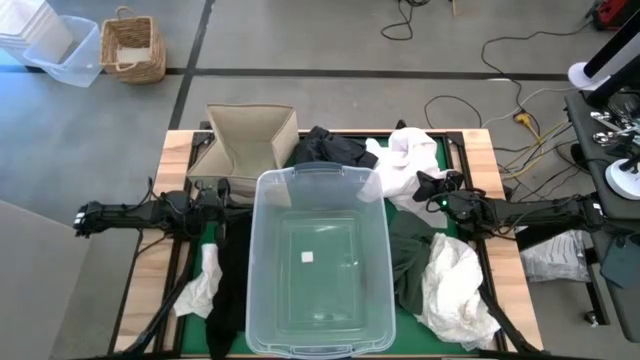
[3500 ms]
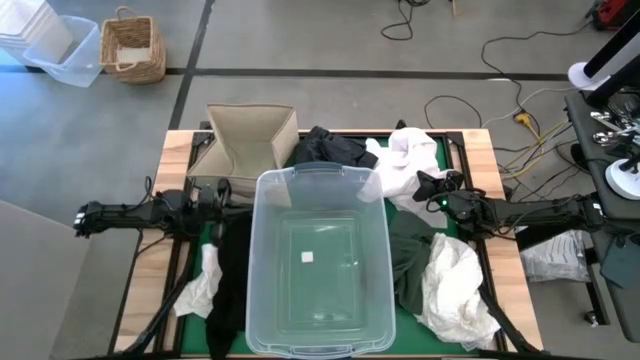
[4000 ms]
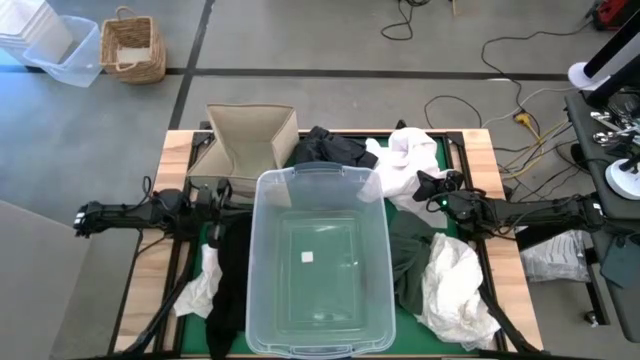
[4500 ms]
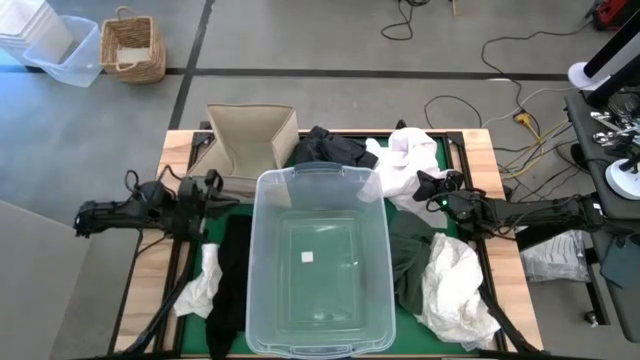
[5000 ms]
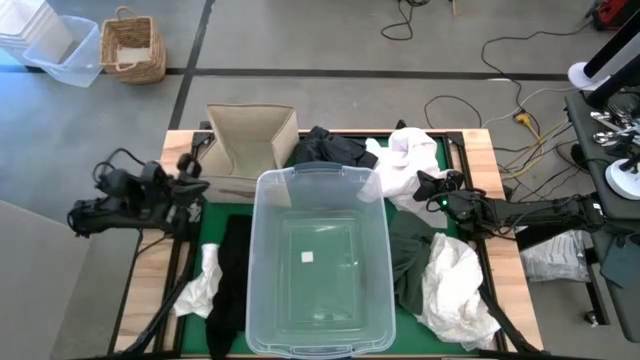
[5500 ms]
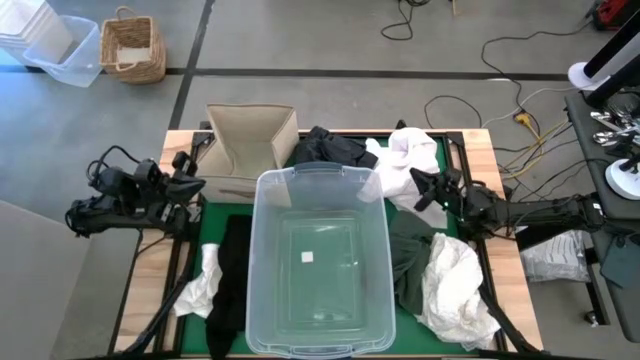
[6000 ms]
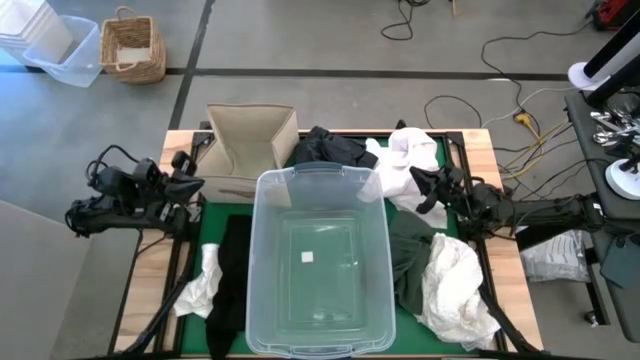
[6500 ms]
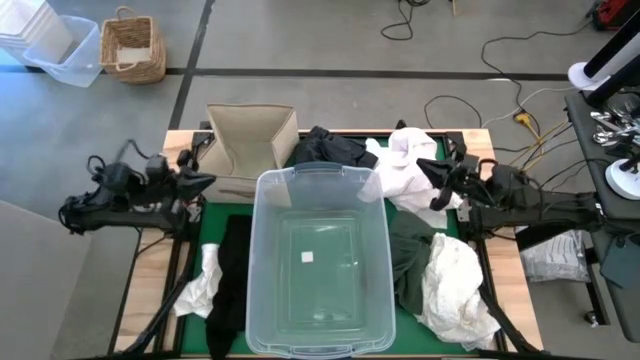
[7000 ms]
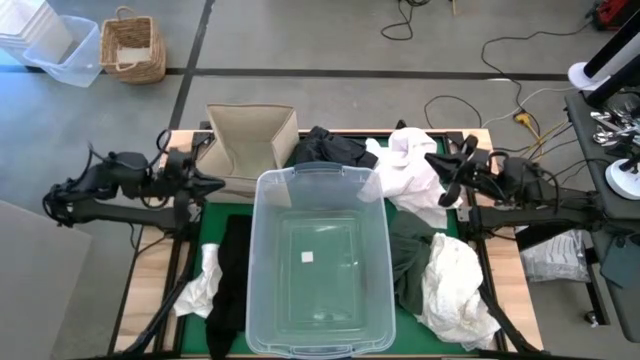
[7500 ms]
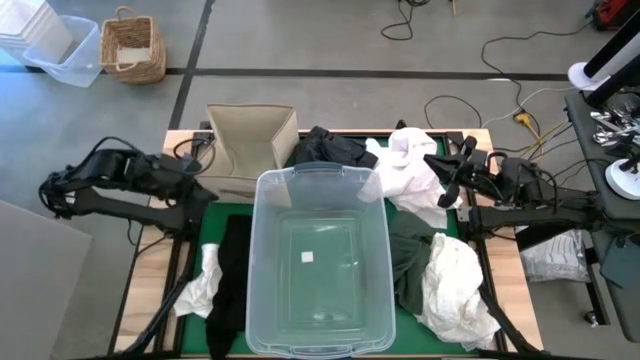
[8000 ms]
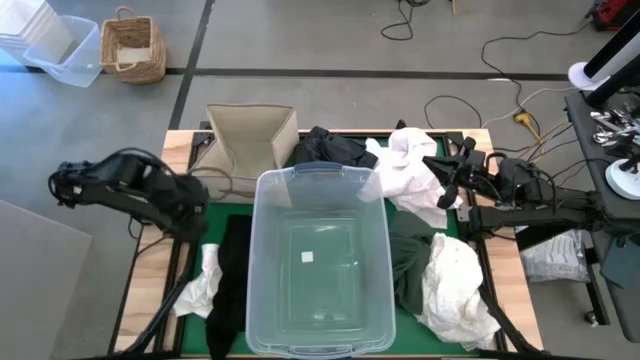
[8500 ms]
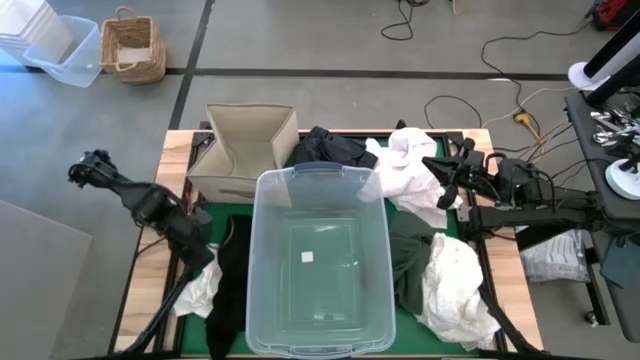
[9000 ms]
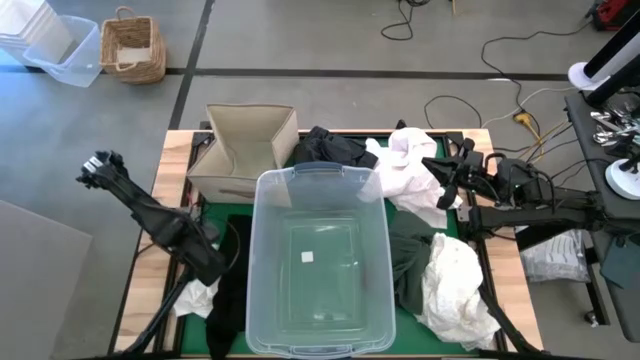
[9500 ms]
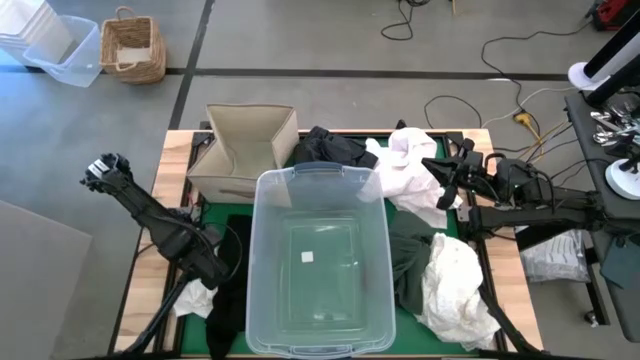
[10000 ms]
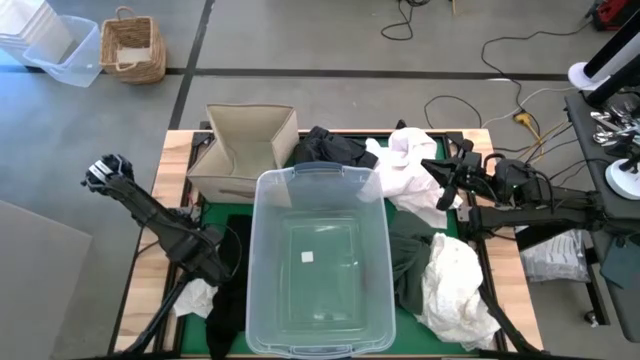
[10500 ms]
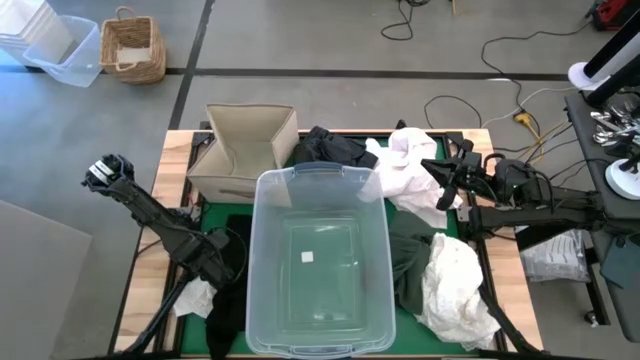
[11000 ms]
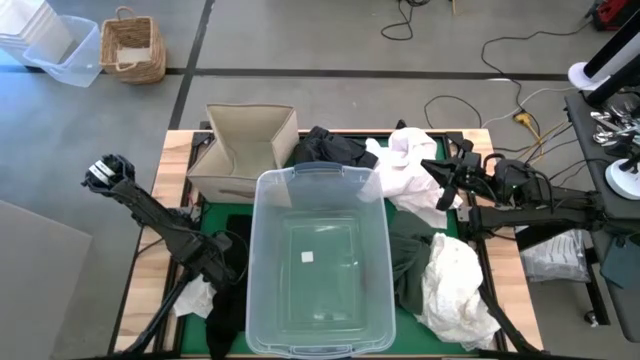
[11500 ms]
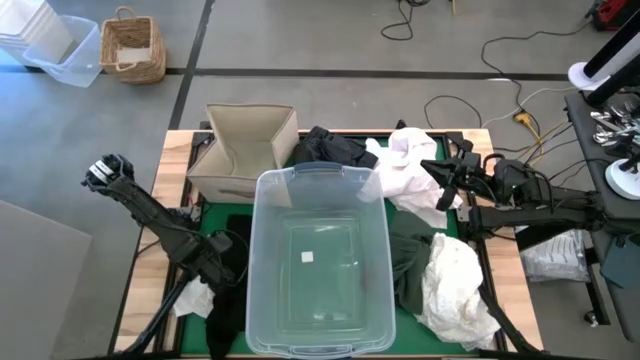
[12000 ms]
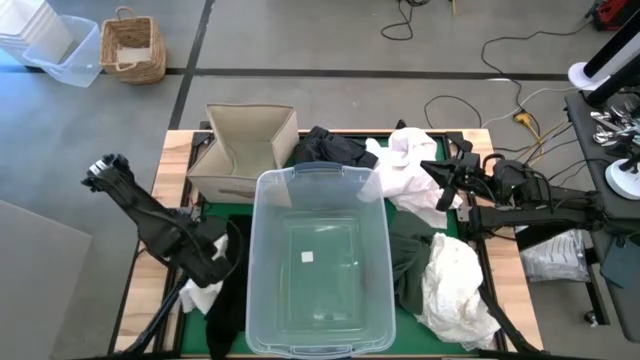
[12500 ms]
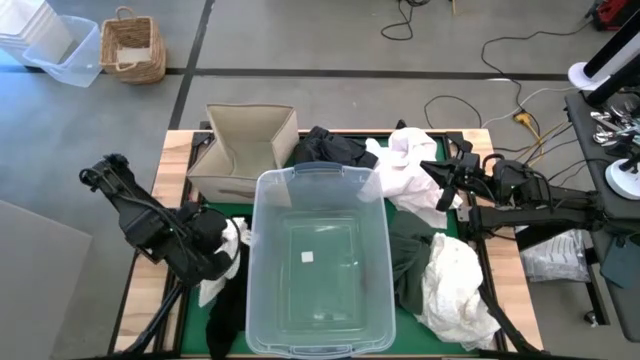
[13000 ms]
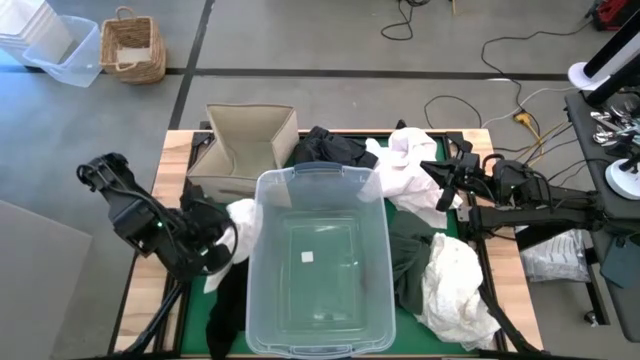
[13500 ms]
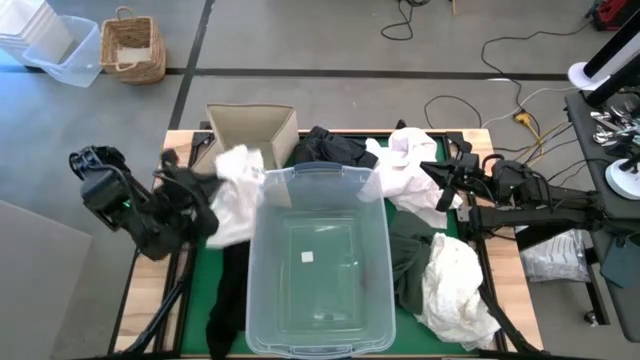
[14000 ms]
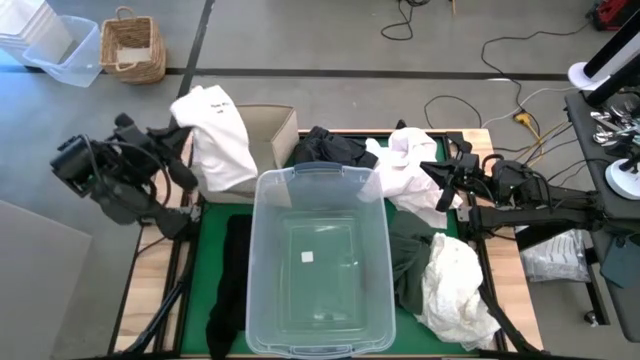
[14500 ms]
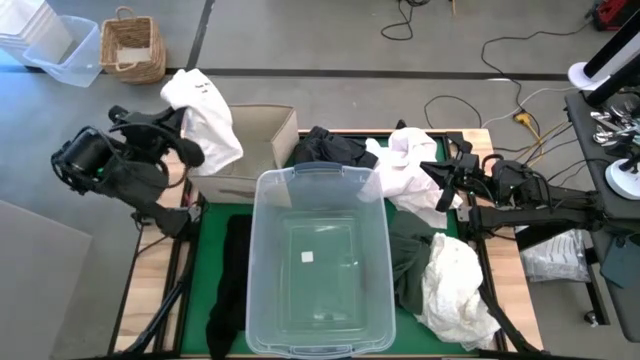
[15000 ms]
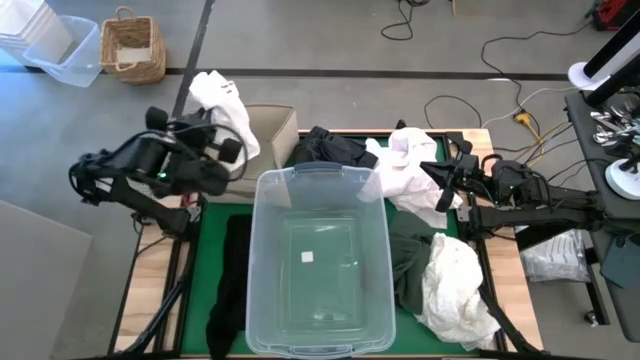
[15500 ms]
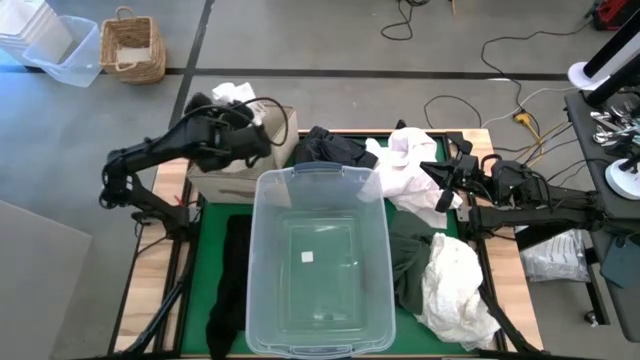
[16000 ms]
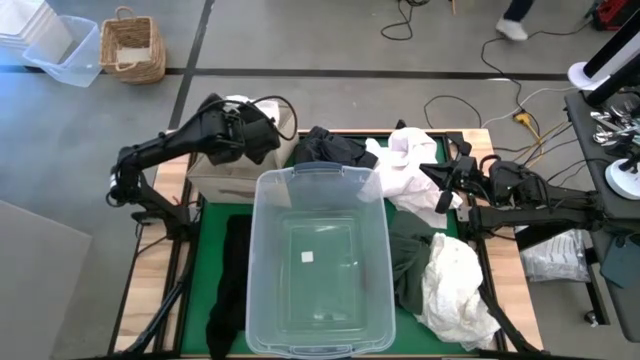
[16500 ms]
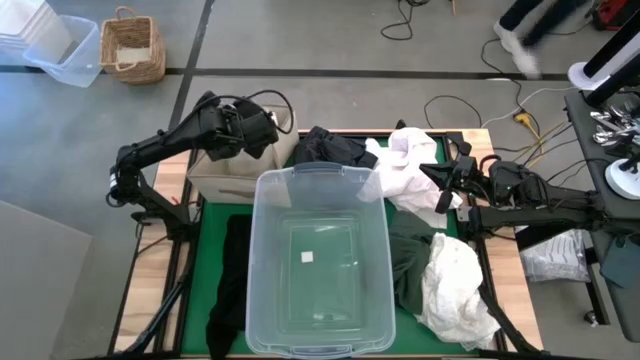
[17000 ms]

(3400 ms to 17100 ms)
Put the white pants into the laundry organizer

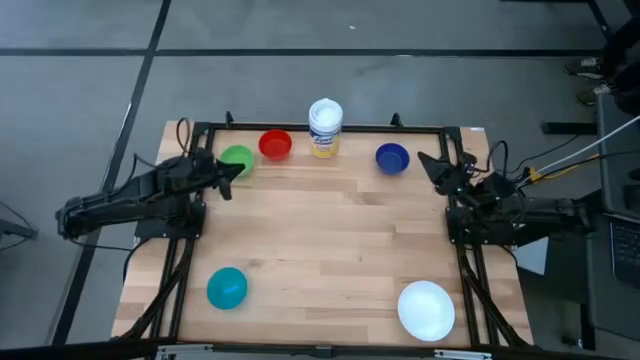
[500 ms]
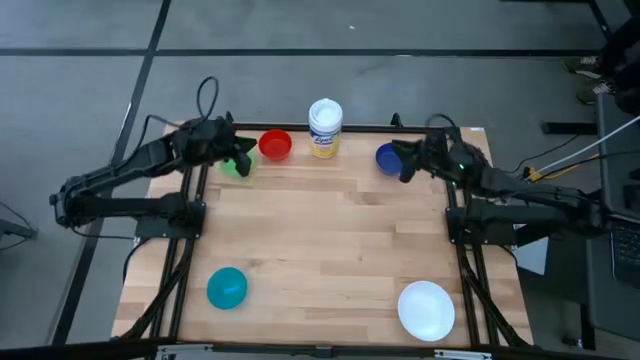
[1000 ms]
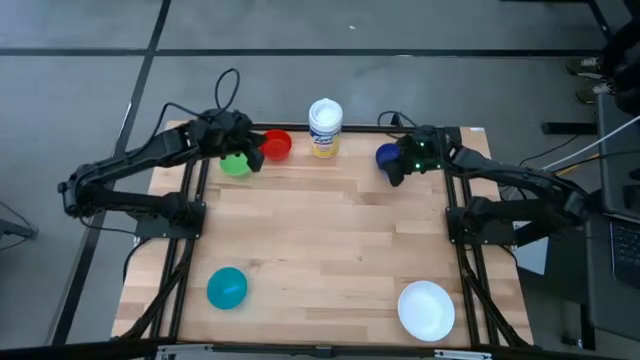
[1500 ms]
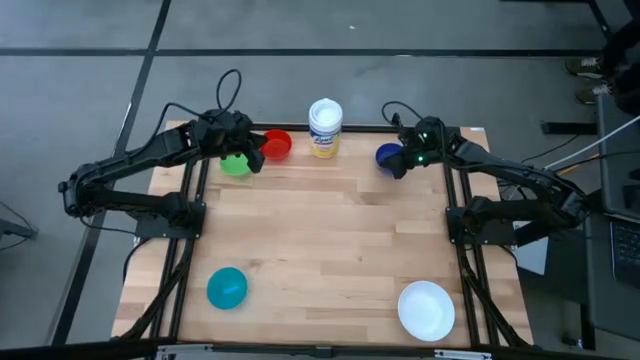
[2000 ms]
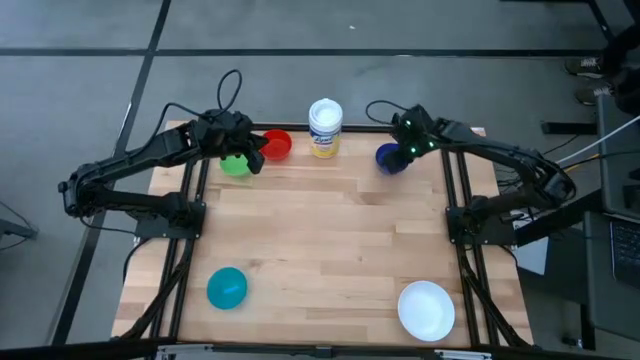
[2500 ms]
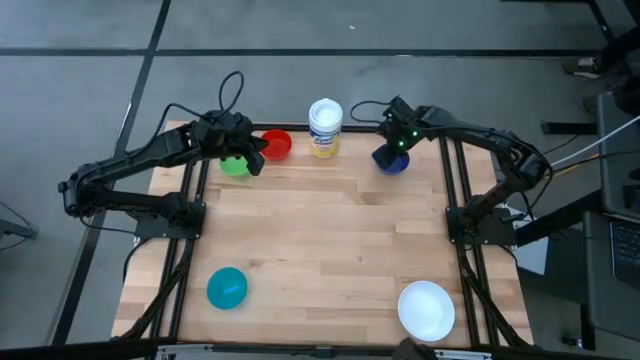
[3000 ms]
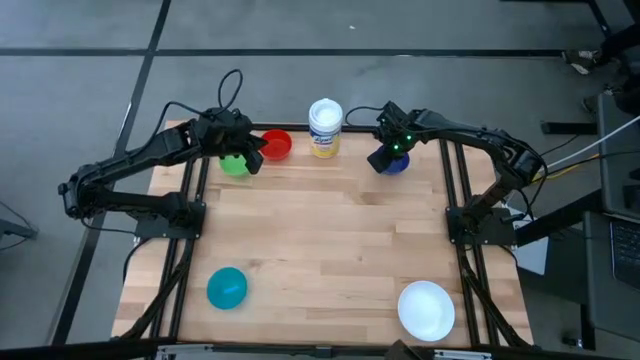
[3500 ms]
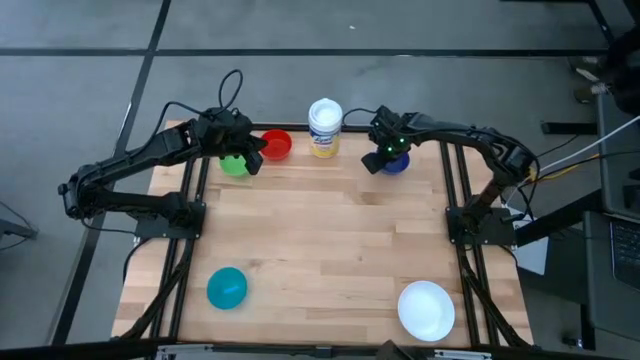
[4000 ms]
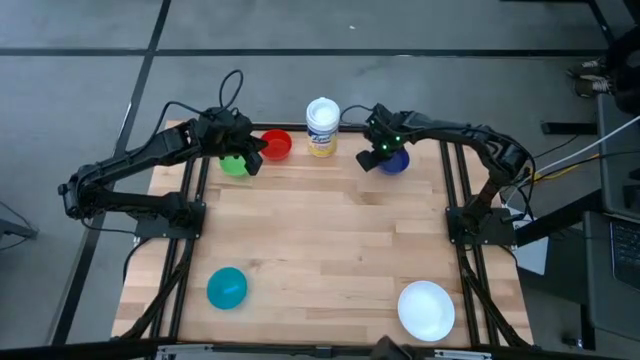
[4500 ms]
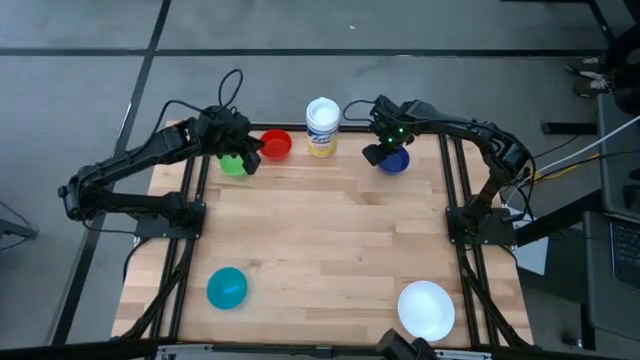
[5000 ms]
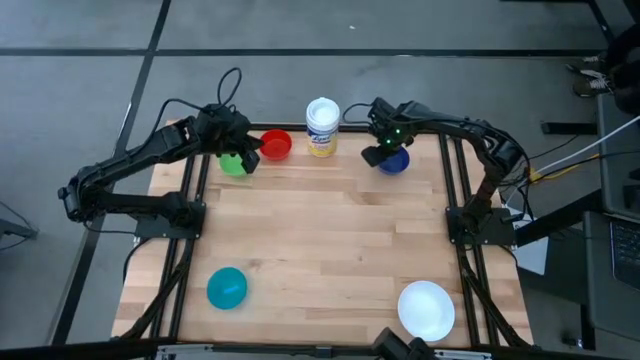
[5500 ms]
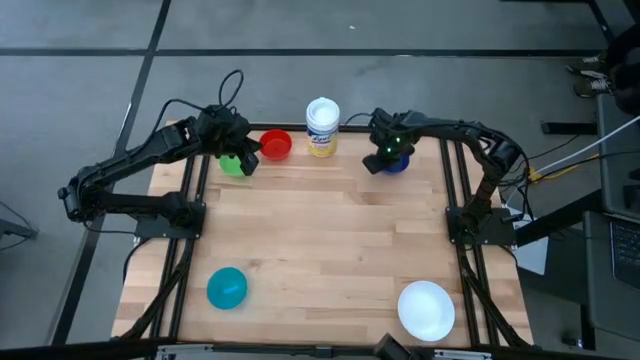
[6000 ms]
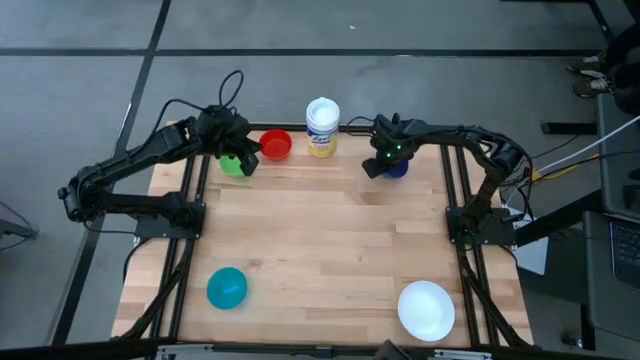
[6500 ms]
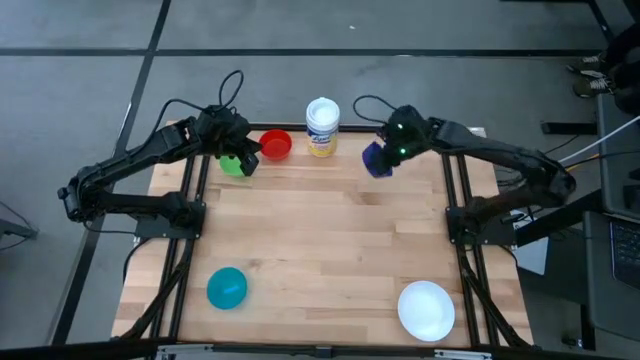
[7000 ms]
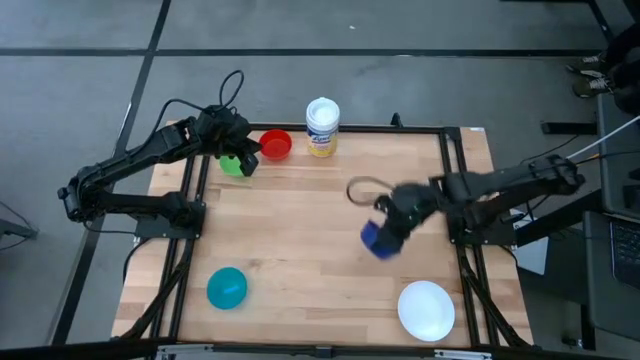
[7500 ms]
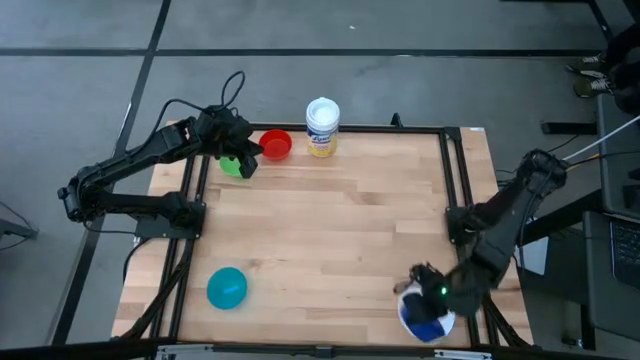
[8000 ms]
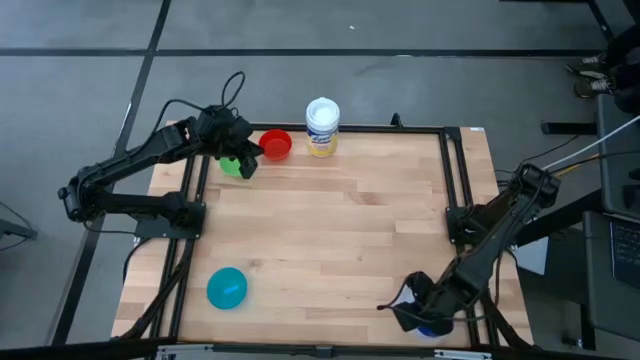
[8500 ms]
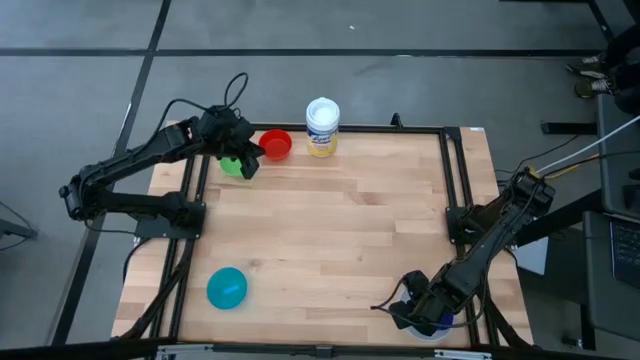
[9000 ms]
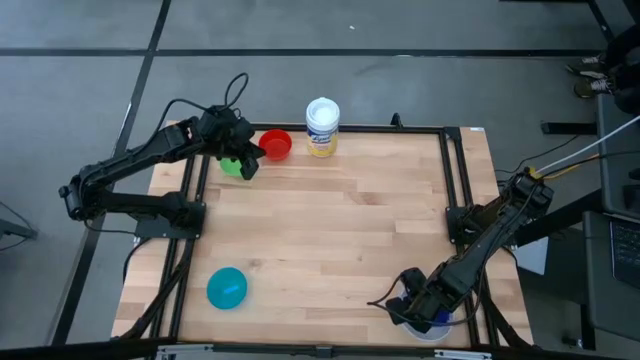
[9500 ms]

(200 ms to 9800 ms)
Stack the blue bowl on top of the white bowl
